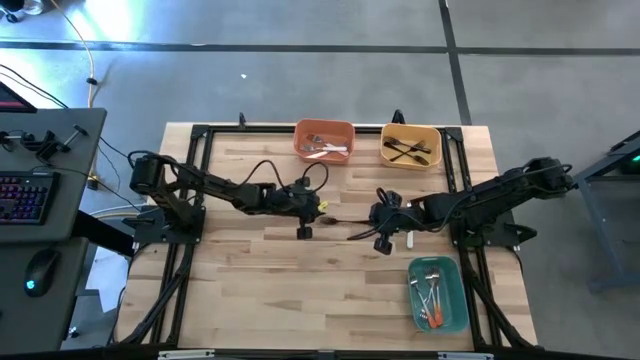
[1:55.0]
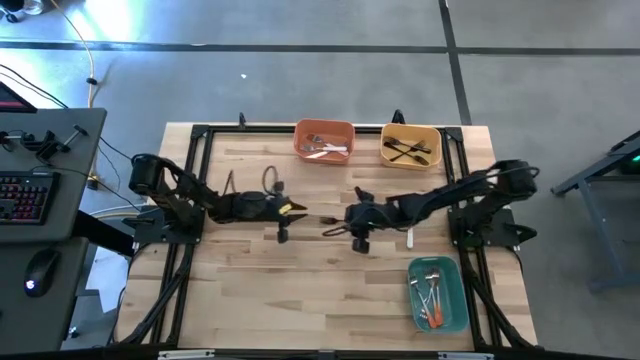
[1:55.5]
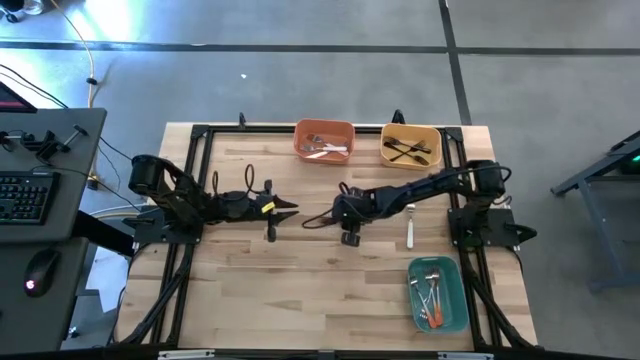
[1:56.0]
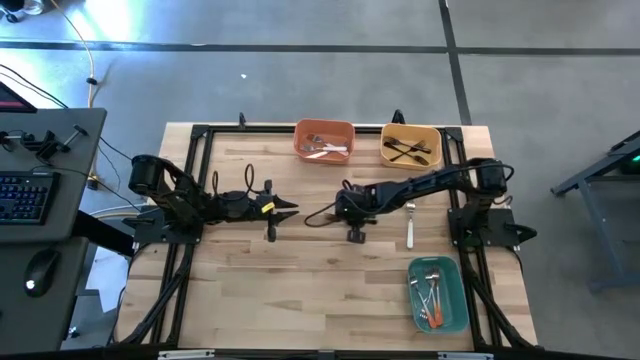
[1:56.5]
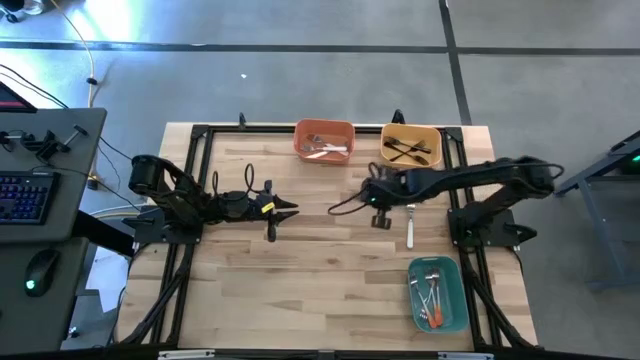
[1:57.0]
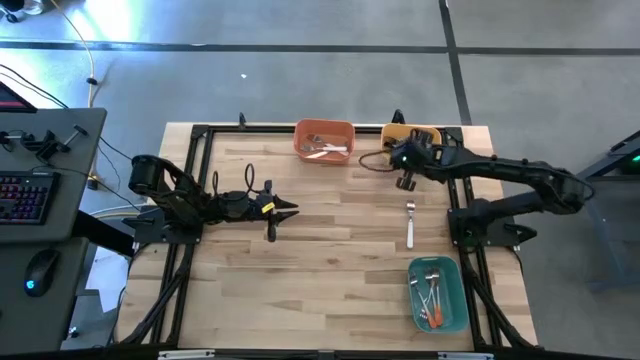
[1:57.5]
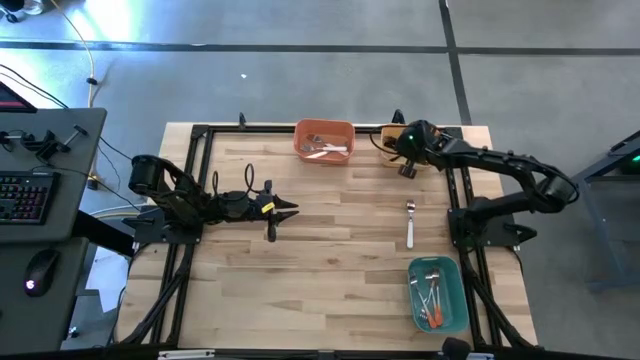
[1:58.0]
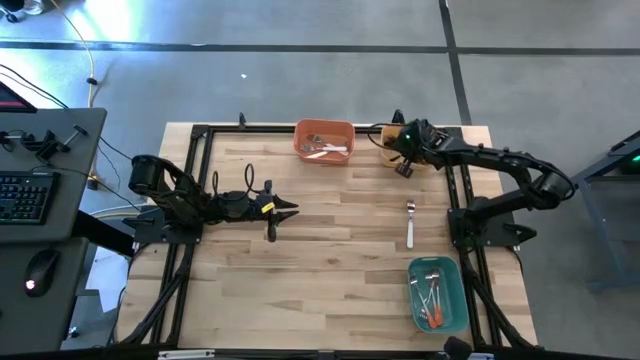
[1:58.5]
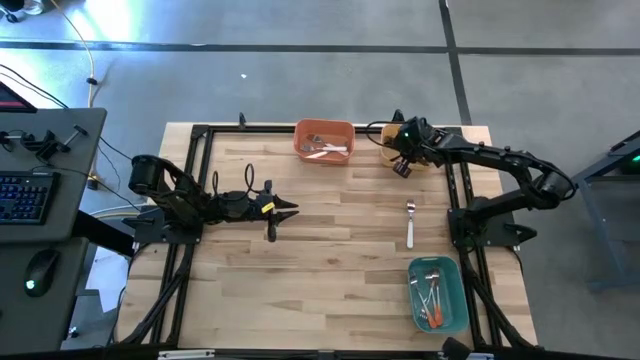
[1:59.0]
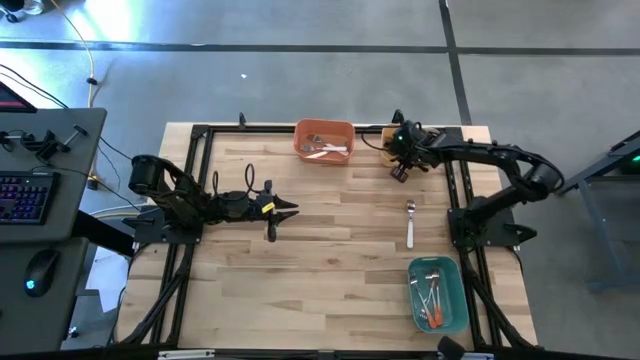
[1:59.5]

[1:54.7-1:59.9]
Task: Sort silverware by color (type)
Put the black fork into the yellow bin

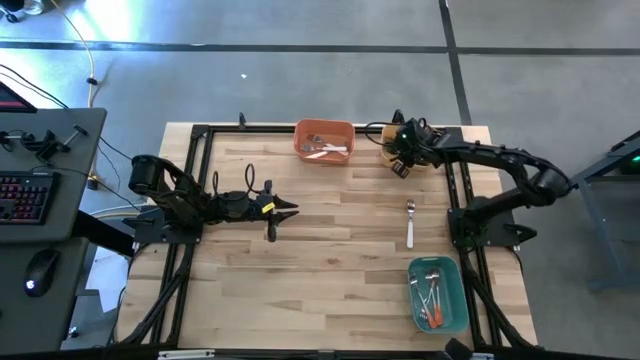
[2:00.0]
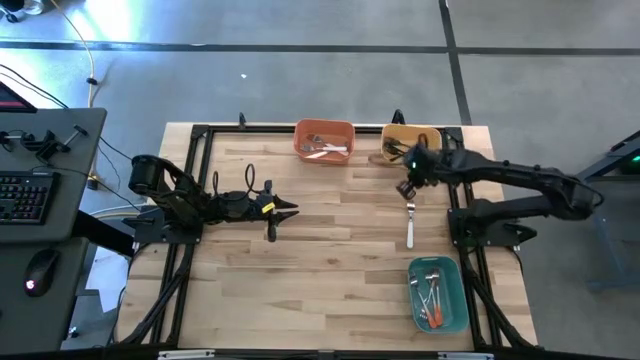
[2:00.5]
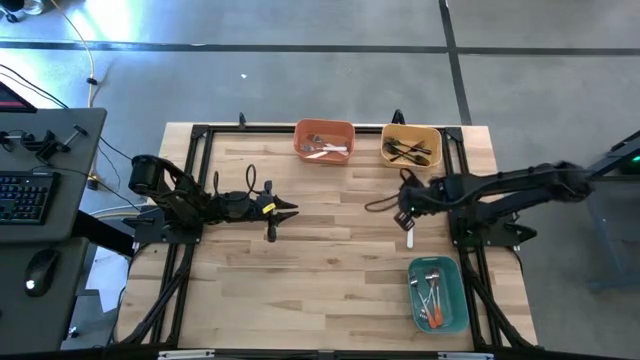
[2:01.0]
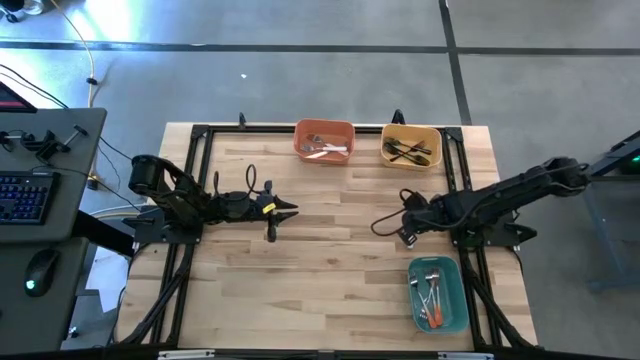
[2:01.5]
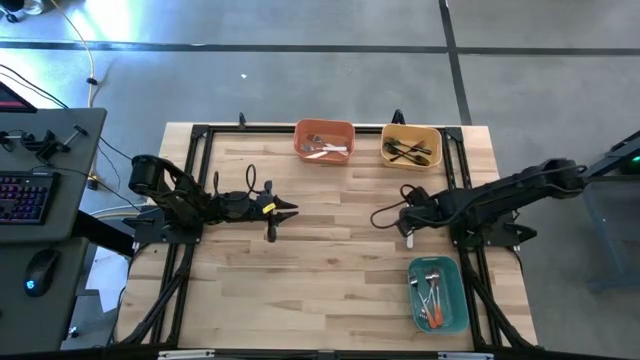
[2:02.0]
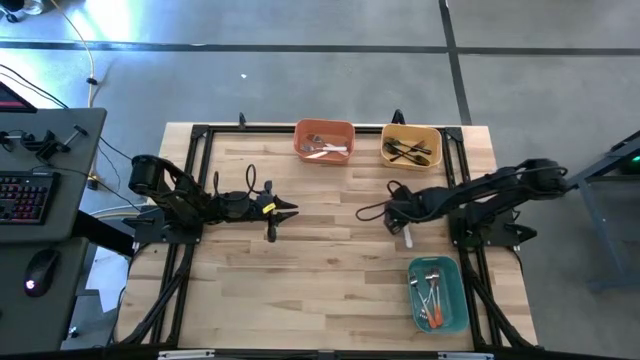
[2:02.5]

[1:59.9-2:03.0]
Put the white fork into the orange bin

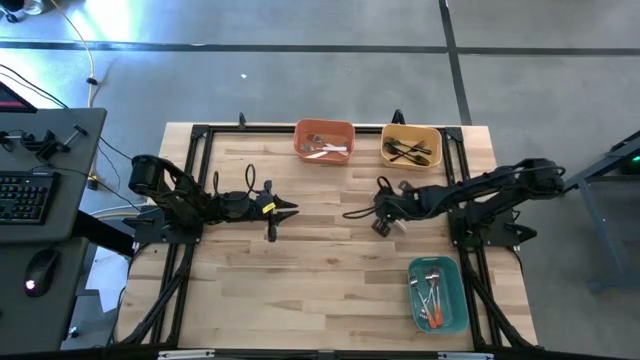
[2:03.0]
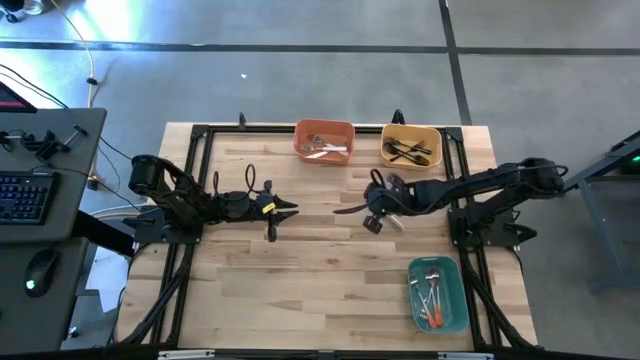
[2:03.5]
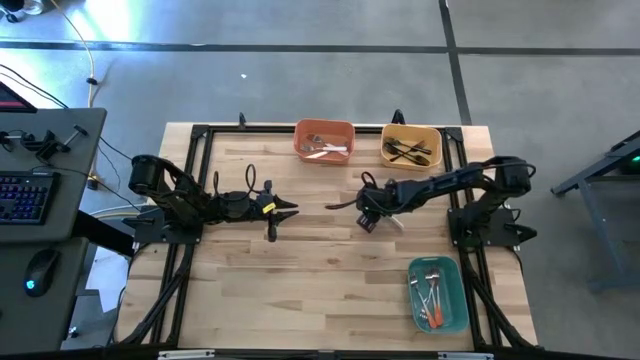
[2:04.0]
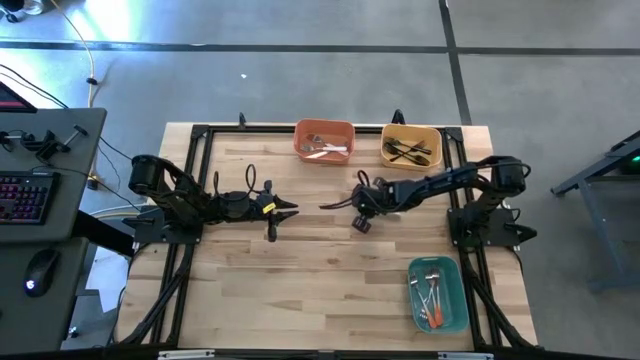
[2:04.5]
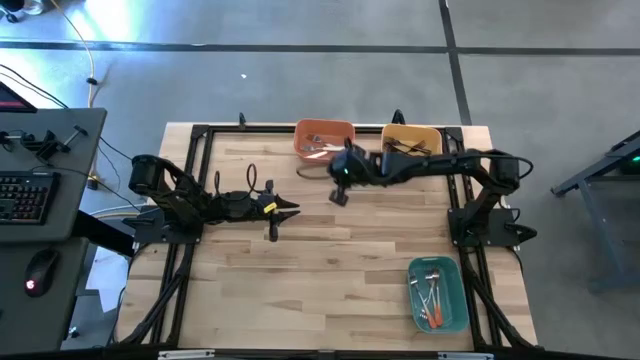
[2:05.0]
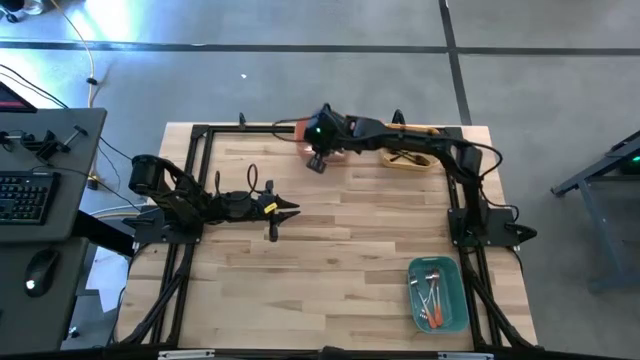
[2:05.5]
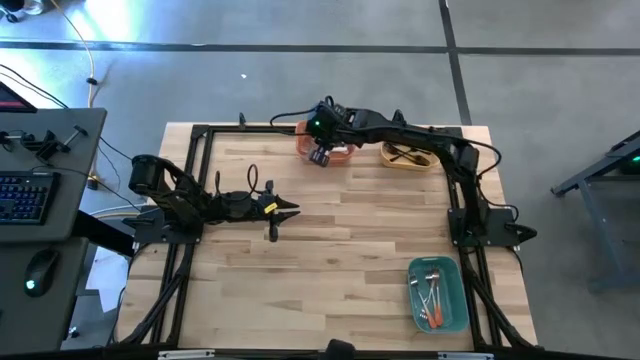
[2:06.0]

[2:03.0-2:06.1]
Put the white fork into the orange bin

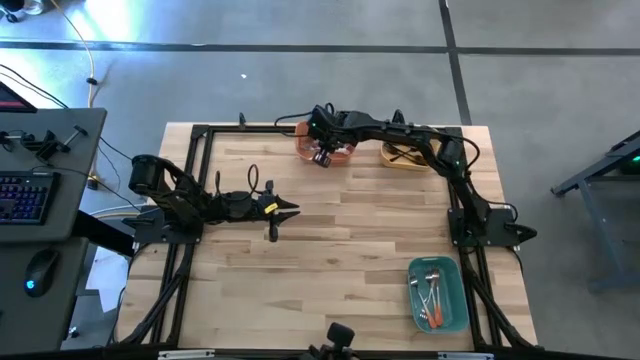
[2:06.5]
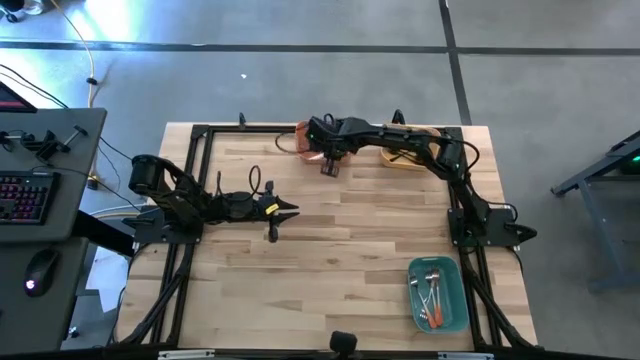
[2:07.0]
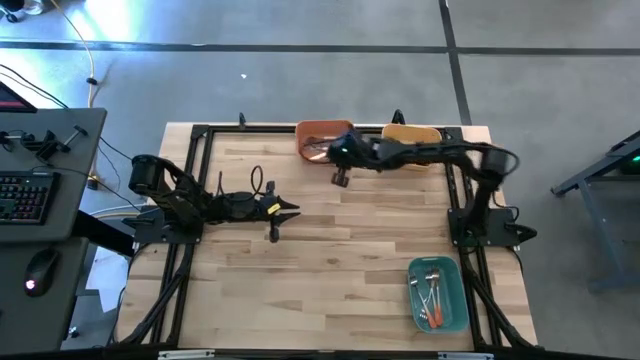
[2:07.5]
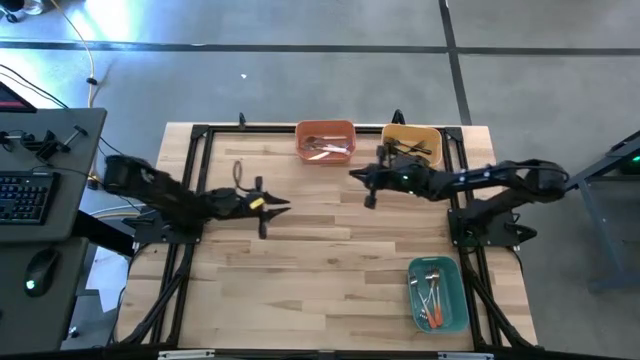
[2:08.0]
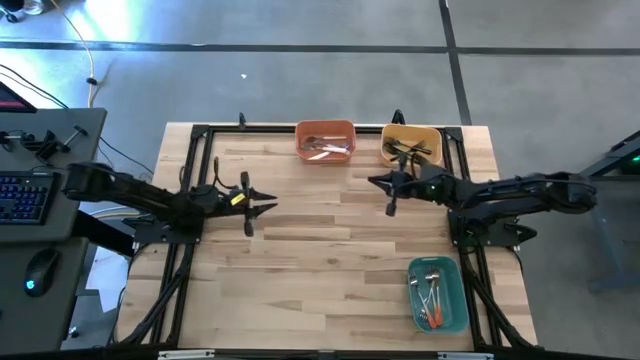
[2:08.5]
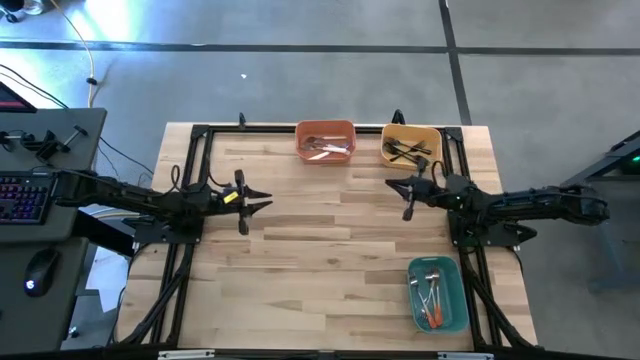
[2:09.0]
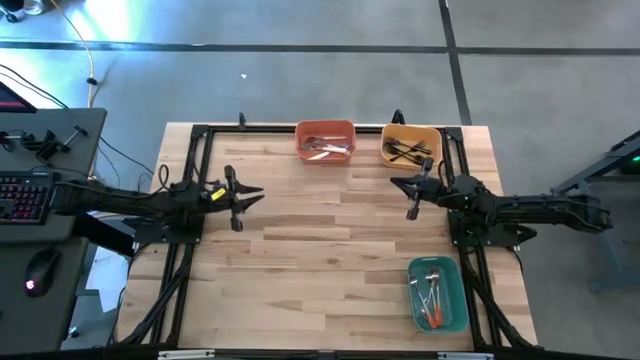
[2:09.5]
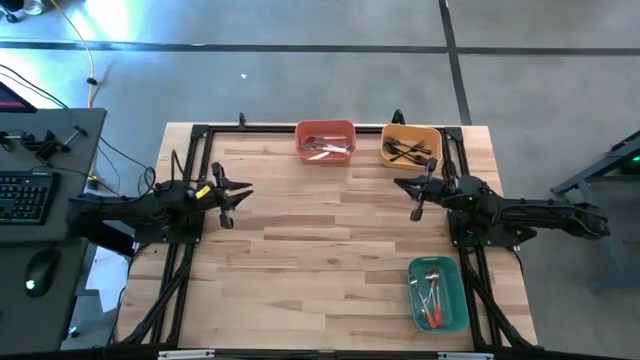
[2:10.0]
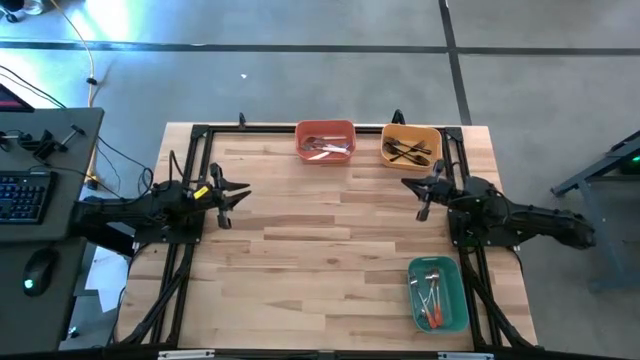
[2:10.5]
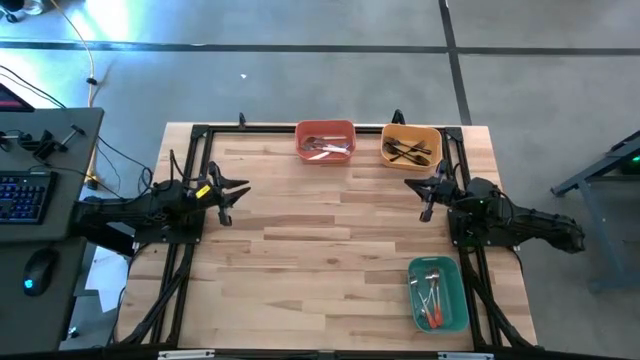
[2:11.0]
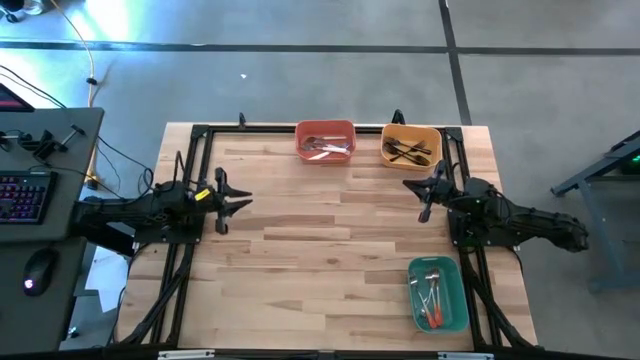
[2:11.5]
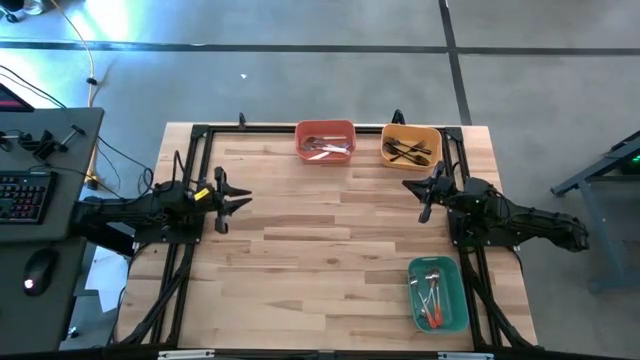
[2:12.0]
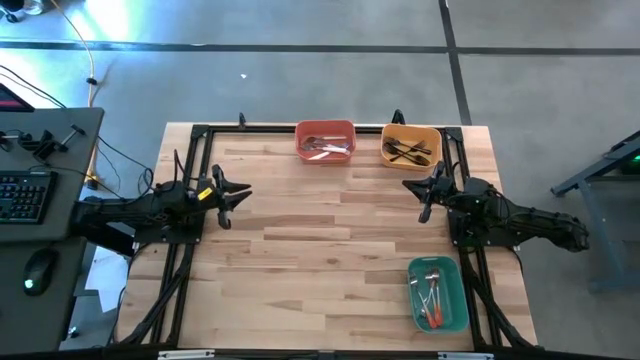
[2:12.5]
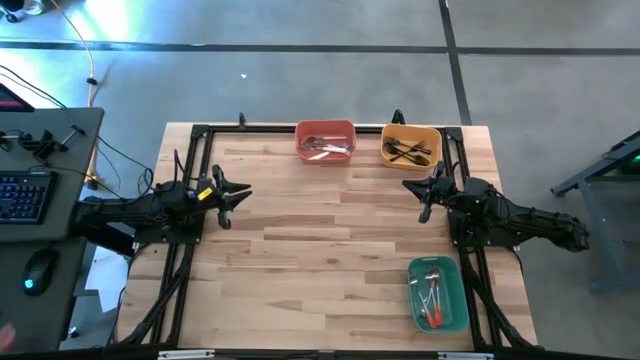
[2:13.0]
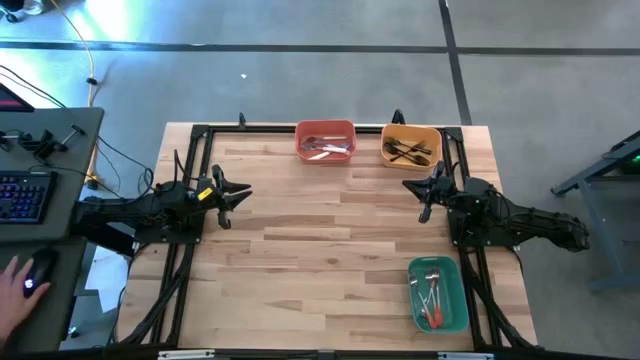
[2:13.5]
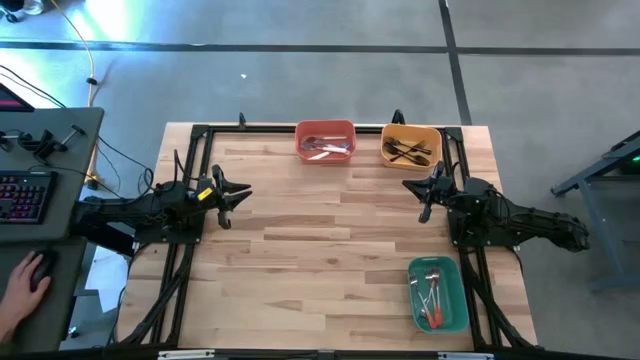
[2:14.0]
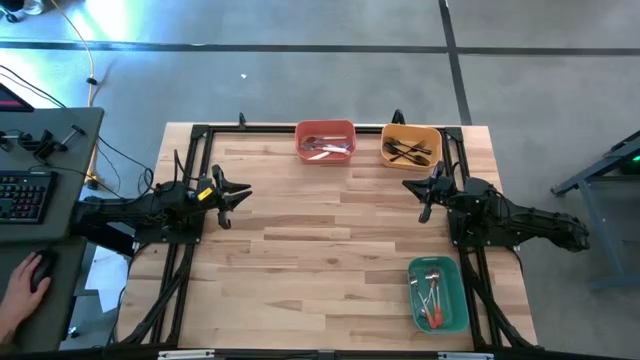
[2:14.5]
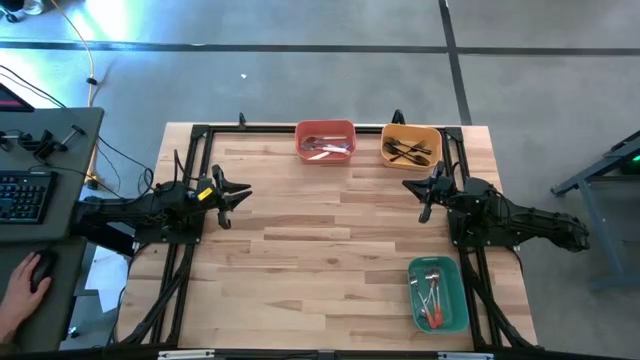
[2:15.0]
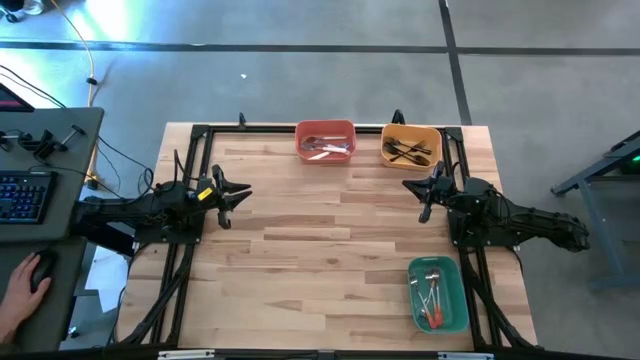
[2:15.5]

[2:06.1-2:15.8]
Return to Home Position
